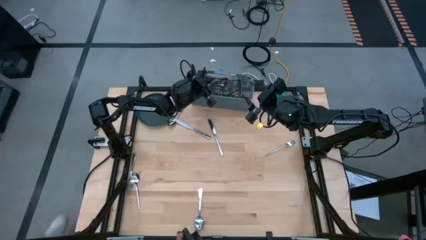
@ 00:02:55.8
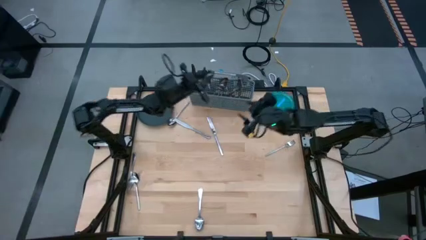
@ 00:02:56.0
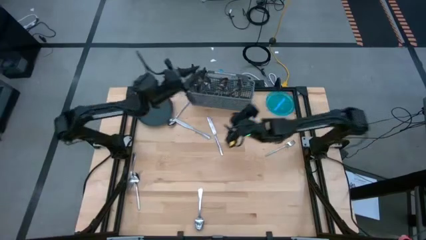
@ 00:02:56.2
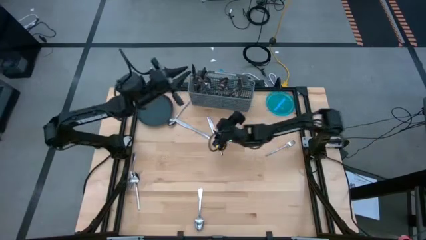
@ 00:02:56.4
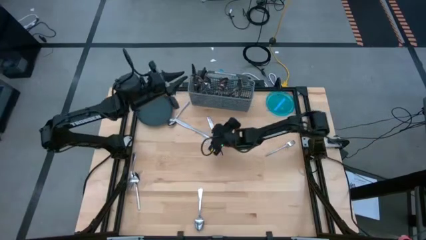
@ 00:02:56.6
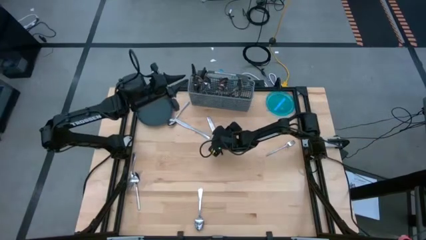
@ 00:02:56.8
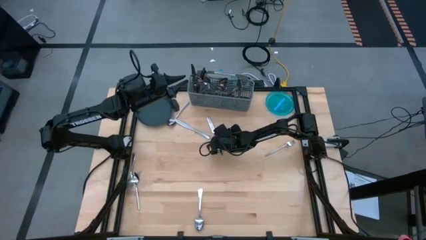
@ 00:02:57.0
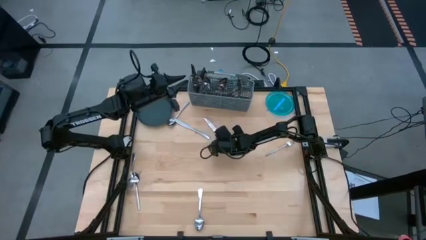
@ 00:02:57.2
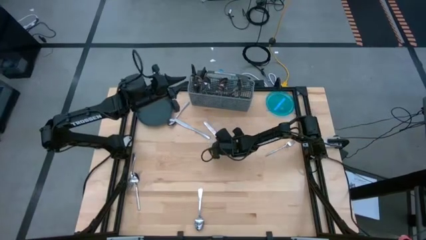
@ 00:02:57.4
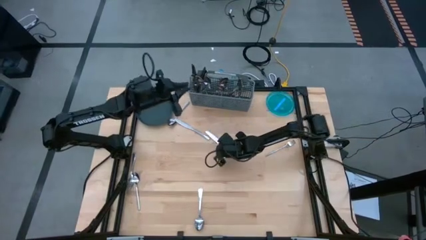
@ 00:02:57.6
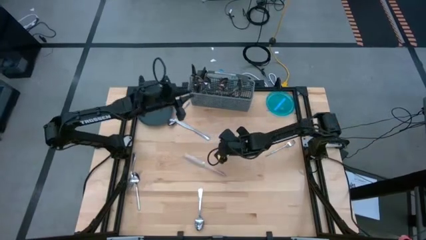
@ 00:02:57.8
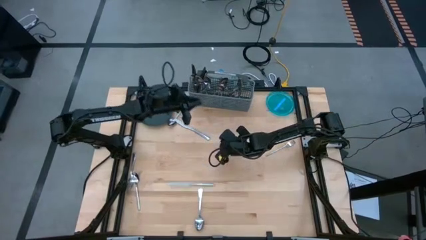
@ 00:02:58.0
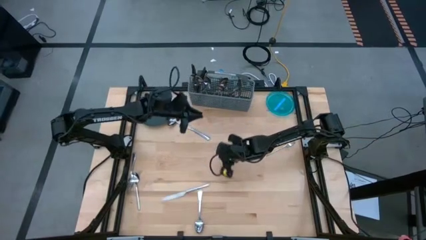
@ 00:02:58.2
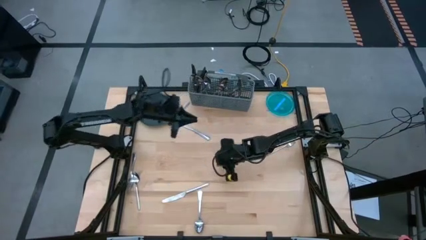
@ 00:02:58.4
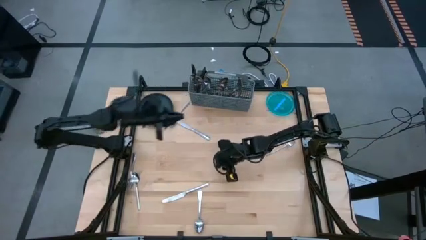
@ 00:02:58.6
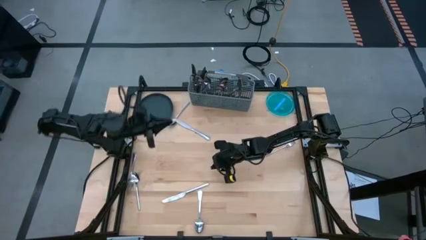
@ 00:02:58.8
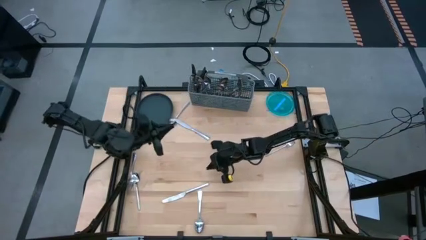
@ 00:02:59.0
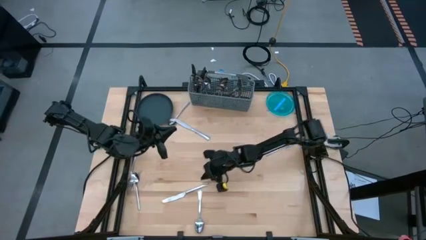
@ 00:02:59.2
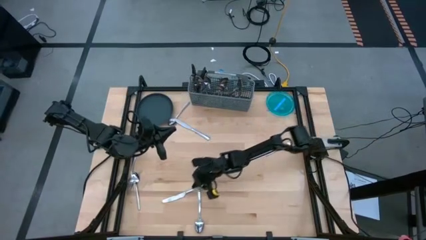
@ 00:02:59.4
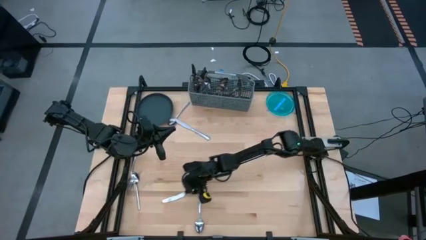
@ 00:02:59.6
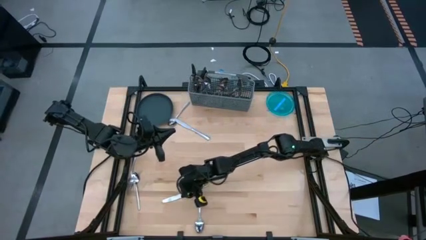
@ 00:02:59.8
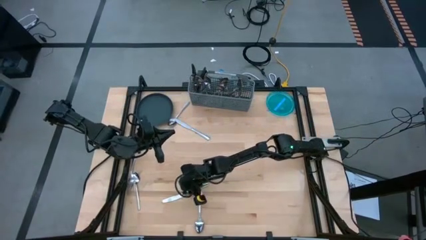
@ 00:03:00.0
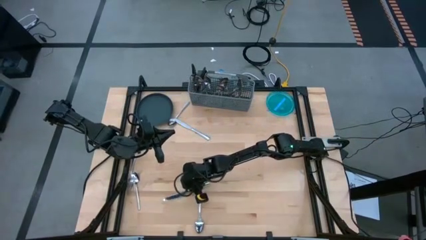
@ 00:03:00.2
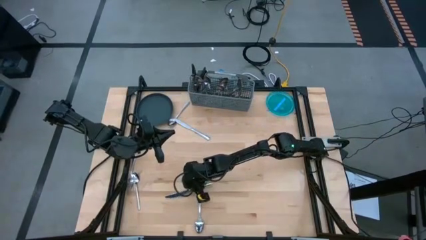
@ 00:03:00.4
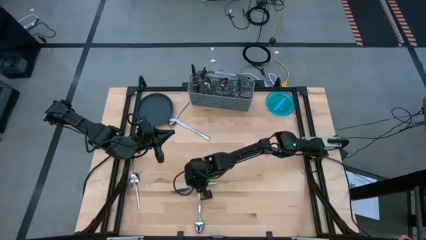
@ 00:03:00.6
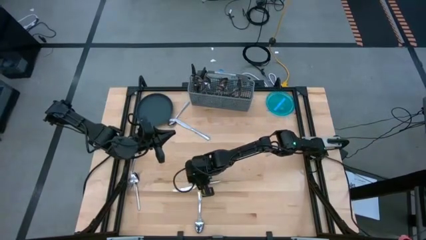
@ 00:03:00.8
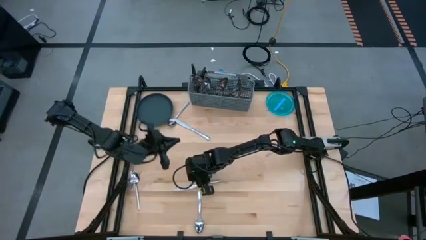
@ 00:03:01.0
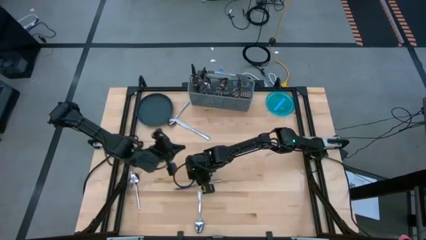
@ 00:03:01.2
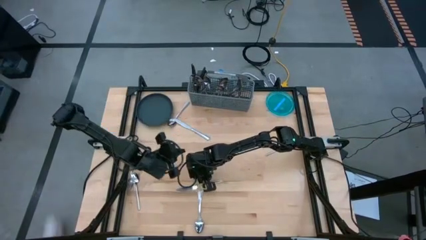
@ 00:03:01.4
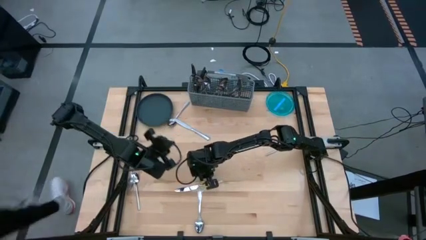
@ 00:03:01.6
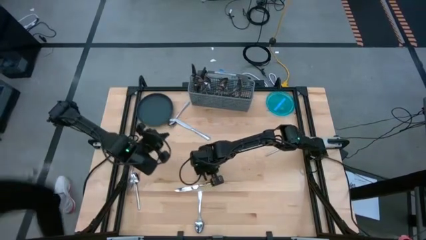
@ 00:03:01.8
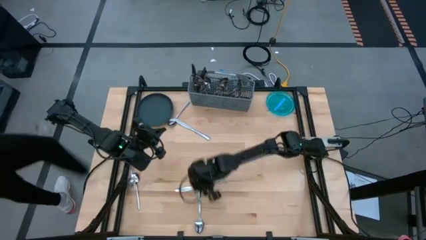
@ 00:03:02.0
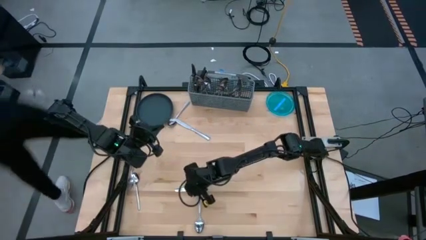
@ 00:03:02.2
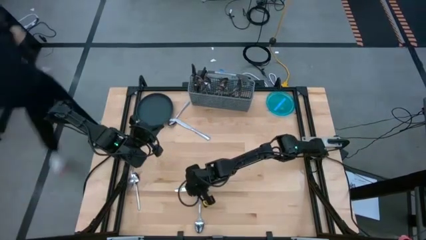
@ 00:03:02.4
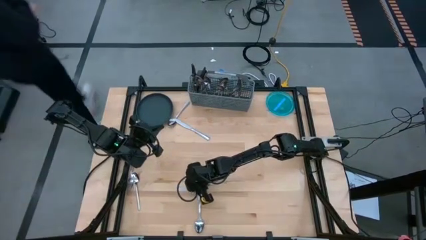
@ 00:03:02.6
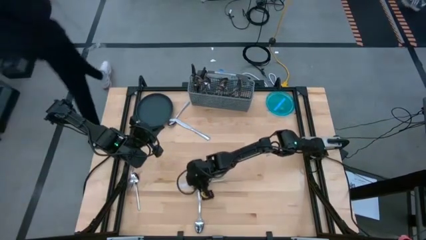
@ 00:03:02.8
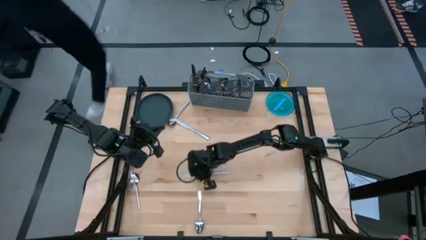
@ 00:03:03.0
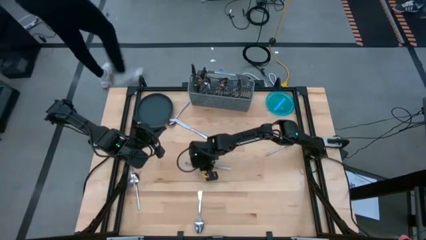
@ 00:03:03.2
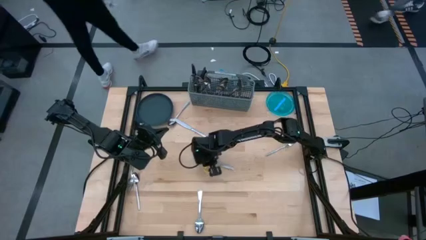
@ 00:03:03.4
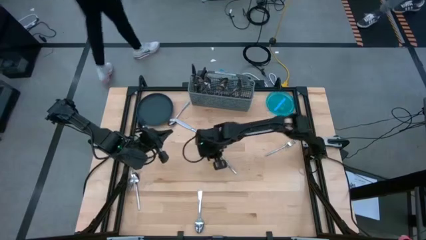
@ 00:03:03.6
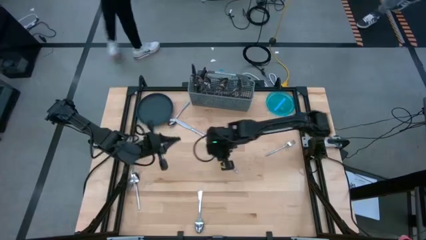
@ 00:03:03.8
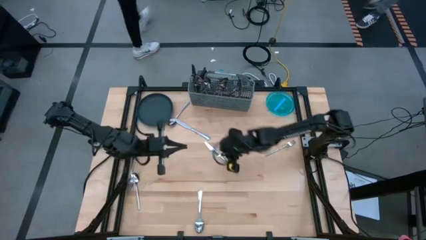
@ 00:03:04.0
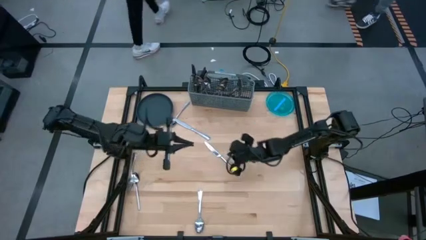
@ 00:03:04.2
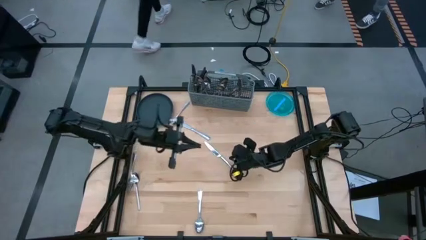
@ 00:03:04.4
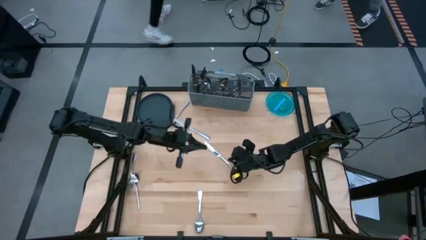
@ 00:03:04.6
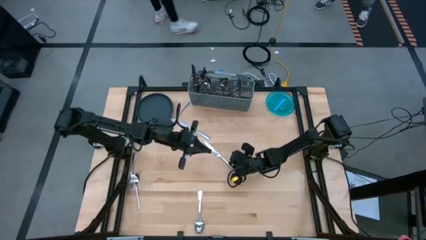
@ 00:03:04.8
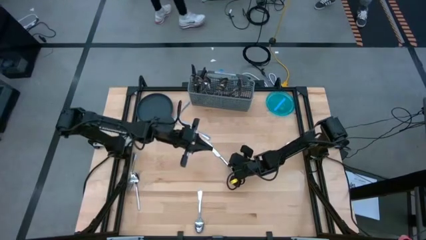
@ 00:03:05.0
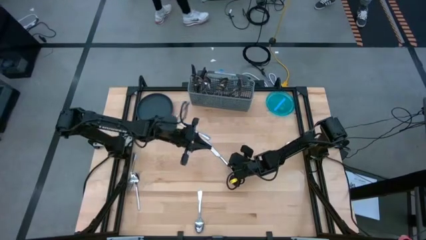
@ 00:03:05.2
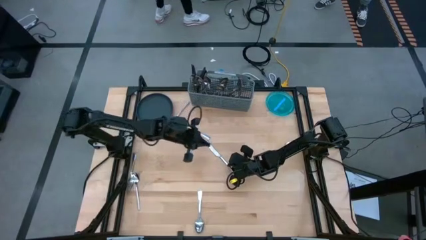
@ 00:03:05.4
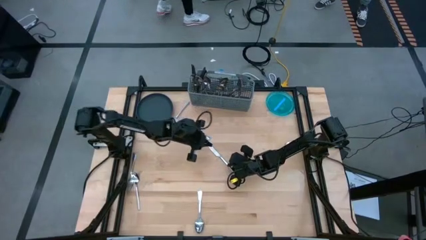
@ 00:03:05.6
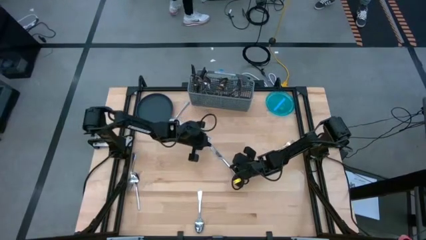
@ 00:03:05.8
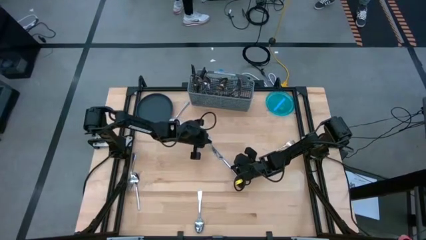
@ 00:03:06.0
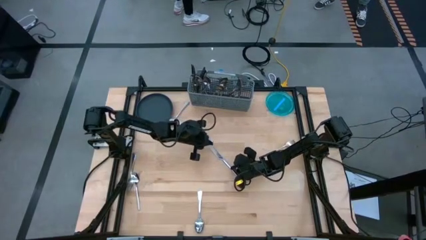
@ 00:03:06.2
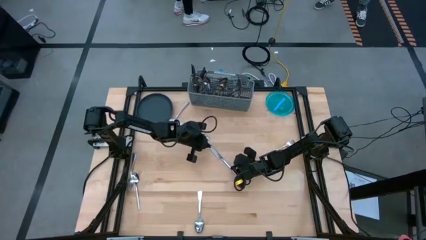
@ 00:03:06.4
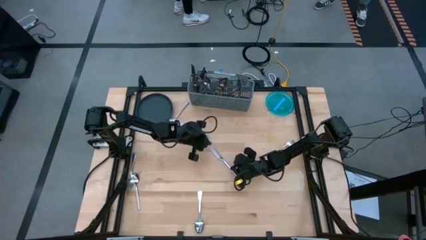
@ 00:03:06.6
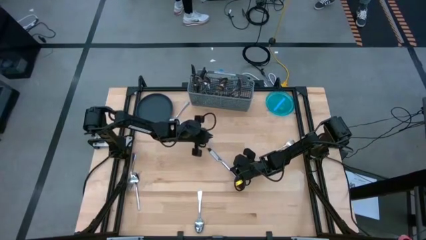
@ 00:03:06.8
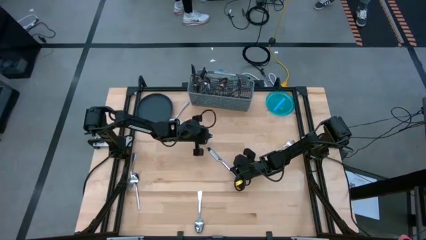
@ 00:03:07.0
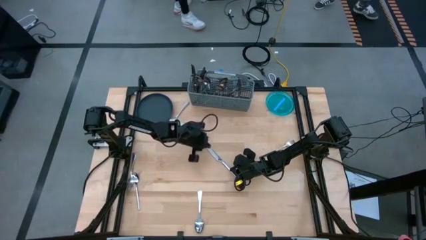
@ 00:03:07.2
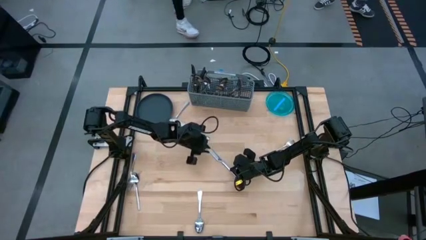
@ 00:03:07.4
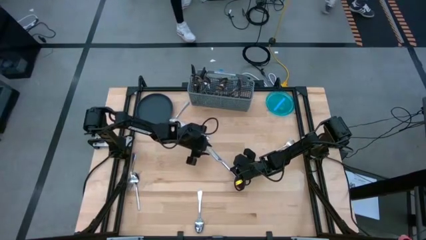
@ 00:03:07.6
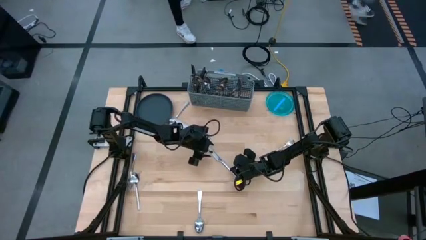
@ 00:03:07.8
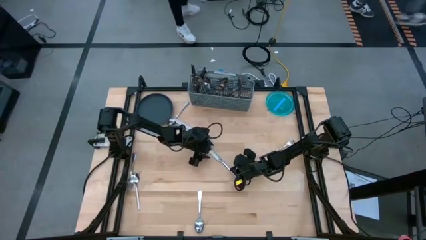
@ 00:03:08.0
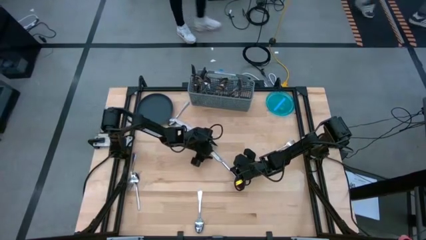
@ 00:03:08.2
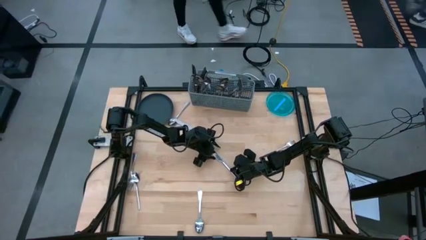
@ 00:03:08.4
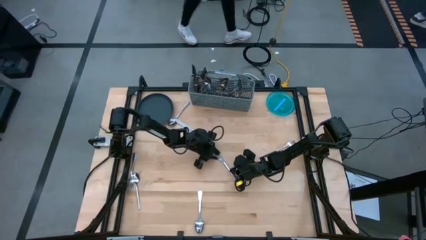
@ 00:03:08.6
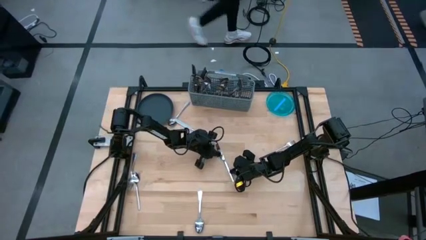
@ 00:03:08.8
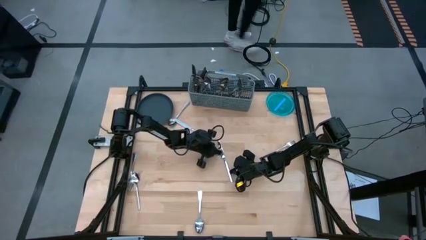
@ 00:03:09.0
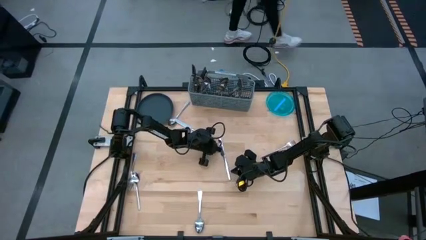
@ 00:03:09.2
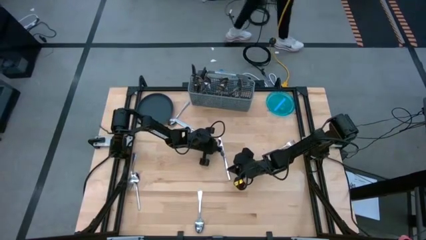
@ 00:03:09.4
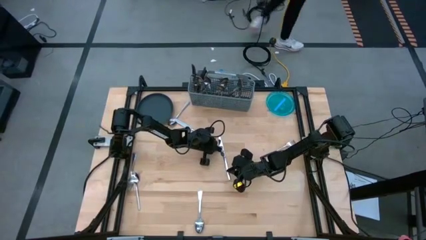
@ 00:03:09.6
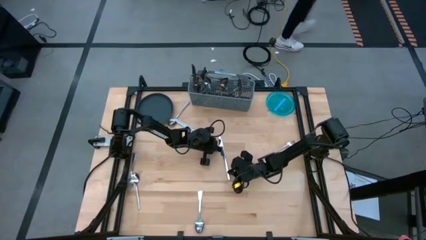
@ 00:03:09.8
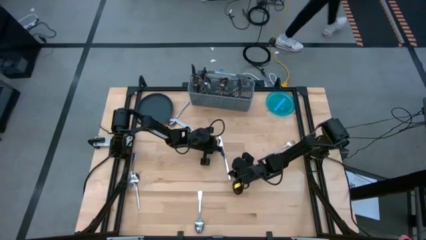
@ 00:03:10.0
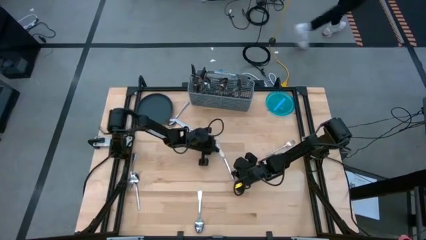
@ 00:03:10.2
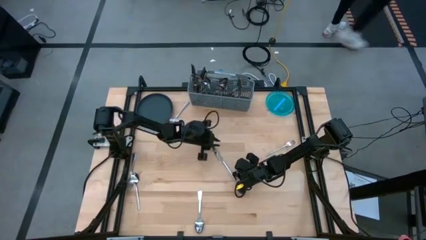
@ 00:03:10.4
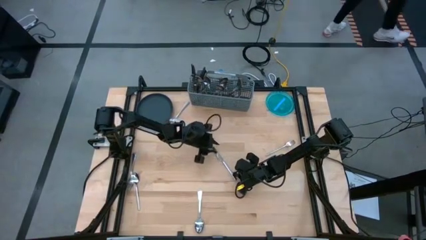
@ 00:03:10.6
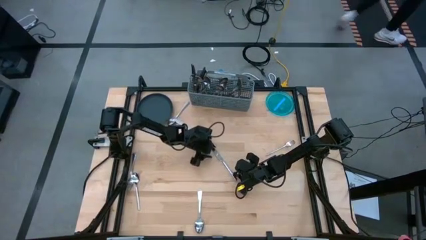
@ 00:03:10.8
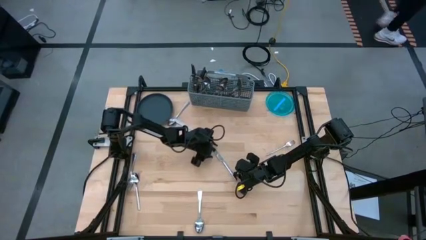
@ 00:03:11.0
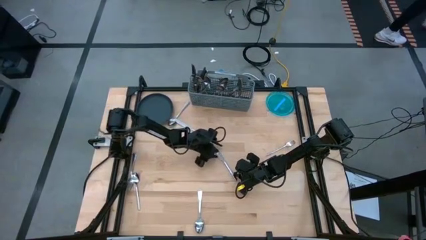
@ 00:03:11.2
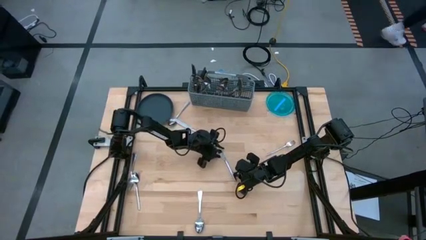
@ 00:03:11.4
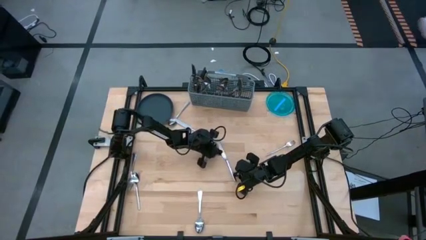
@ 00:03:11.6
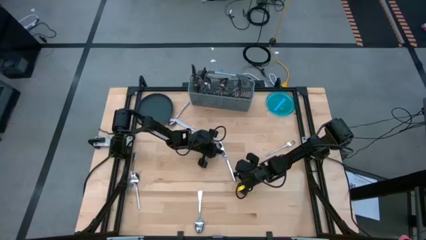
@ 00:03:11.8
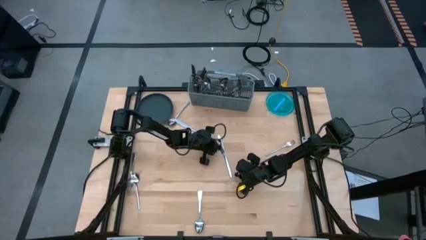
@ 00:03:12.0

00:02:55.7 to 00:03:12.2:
Task: Sort silverware
Put the knife into the silverware basket
